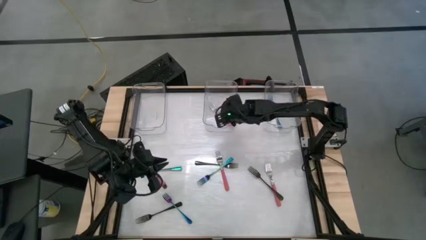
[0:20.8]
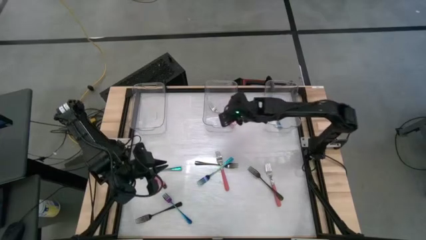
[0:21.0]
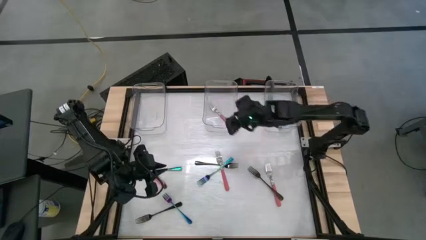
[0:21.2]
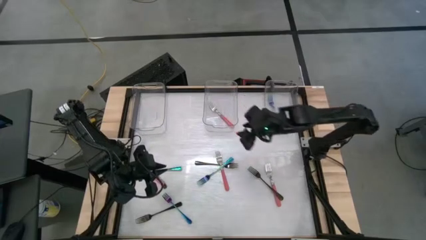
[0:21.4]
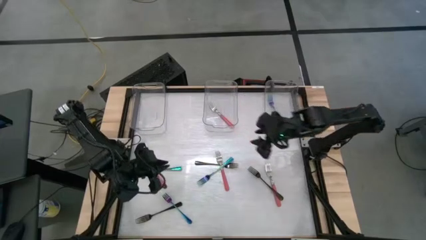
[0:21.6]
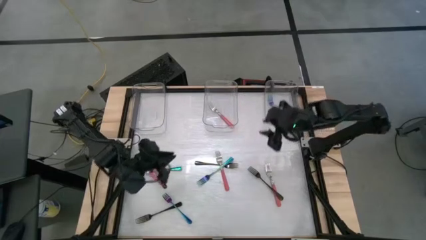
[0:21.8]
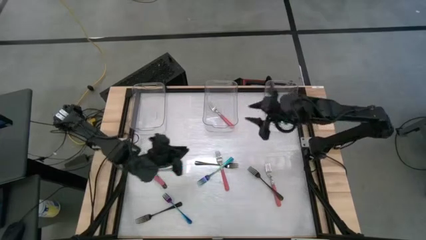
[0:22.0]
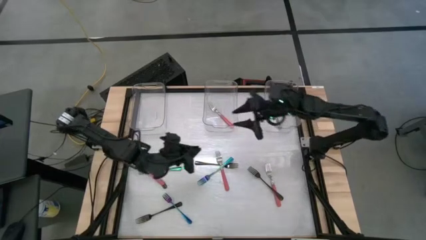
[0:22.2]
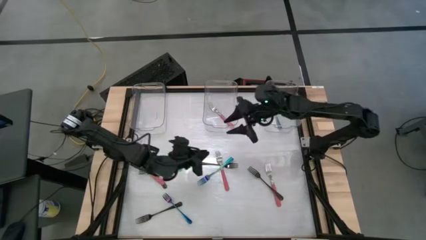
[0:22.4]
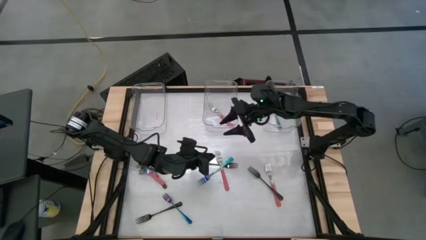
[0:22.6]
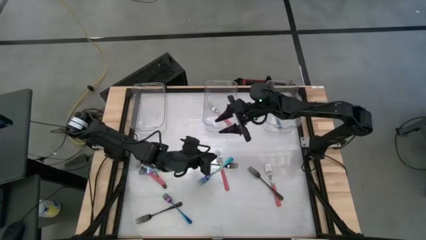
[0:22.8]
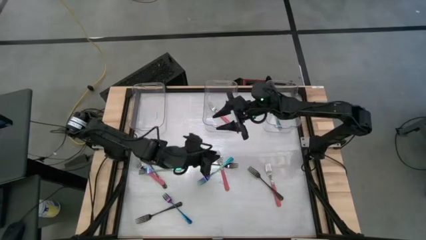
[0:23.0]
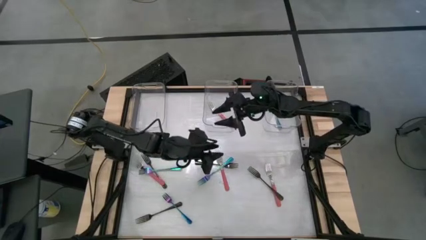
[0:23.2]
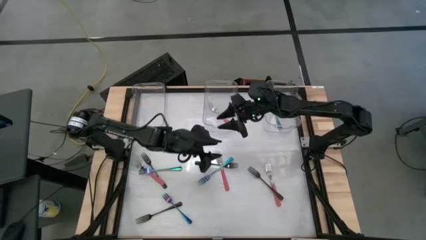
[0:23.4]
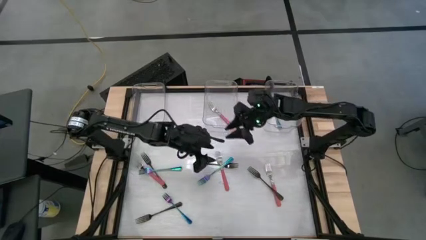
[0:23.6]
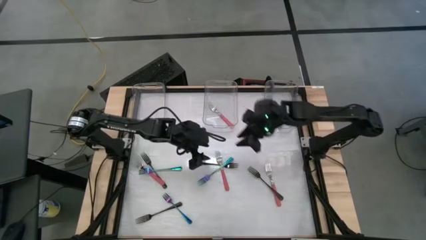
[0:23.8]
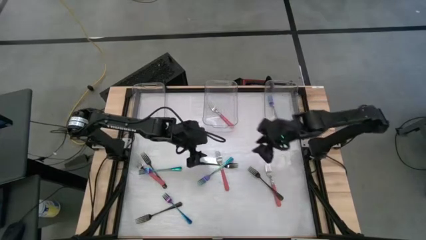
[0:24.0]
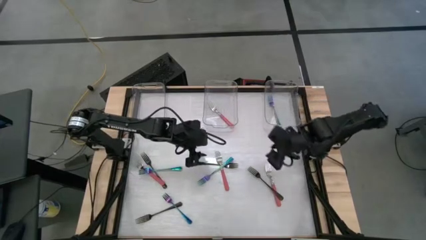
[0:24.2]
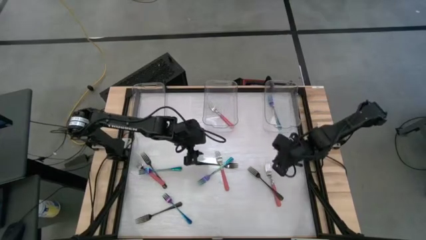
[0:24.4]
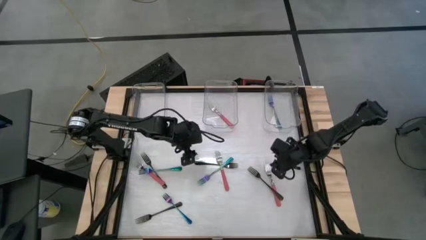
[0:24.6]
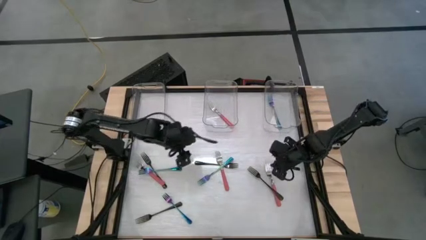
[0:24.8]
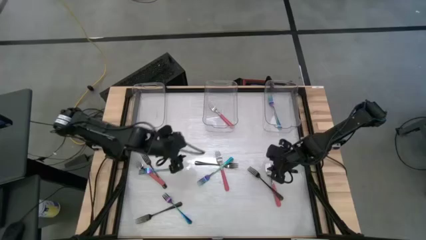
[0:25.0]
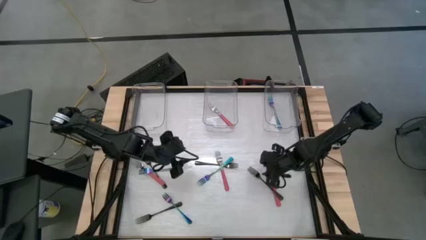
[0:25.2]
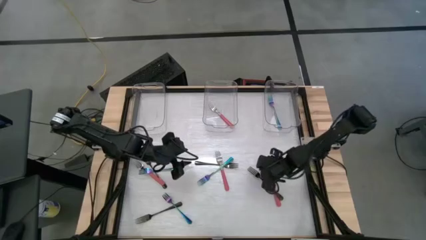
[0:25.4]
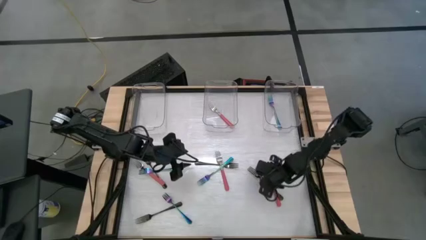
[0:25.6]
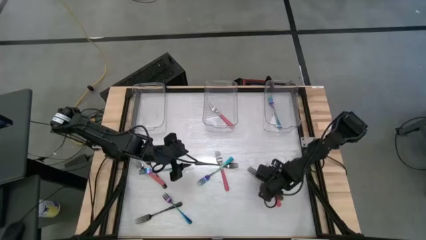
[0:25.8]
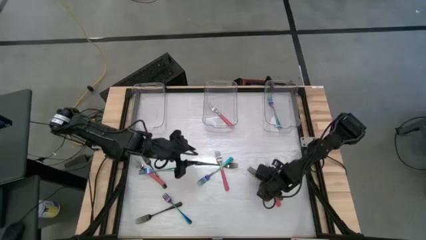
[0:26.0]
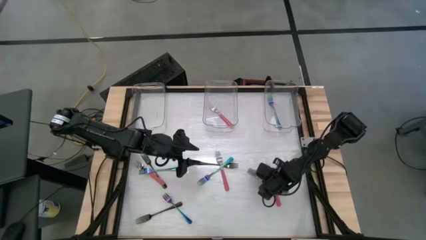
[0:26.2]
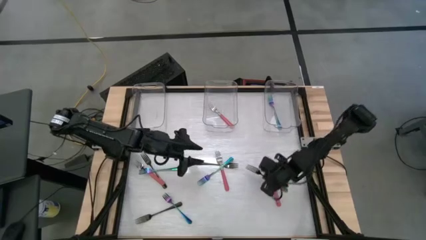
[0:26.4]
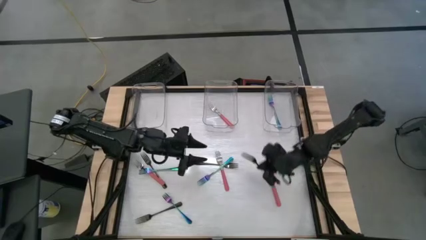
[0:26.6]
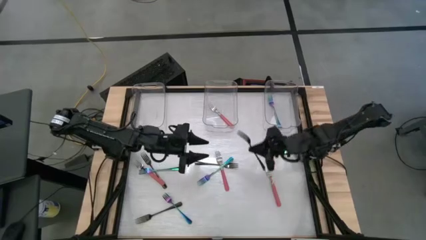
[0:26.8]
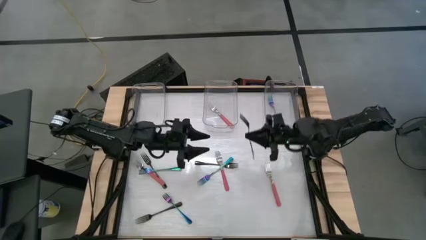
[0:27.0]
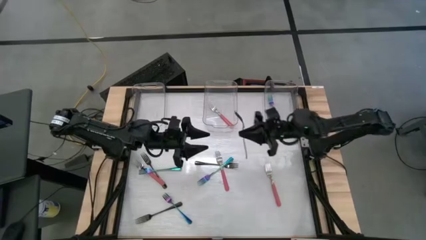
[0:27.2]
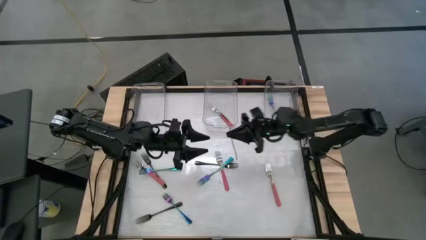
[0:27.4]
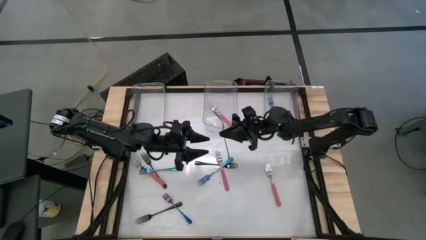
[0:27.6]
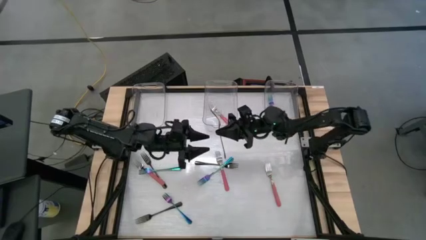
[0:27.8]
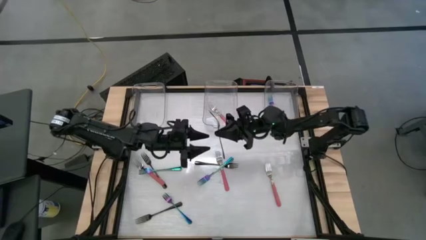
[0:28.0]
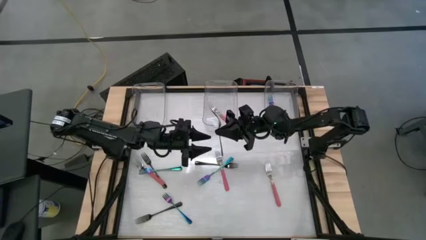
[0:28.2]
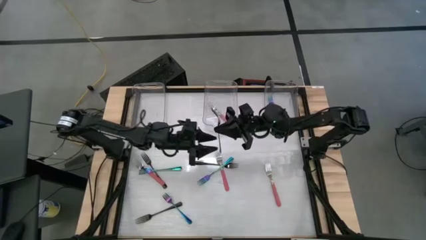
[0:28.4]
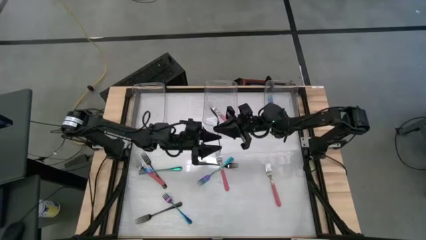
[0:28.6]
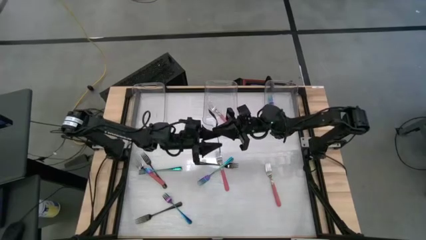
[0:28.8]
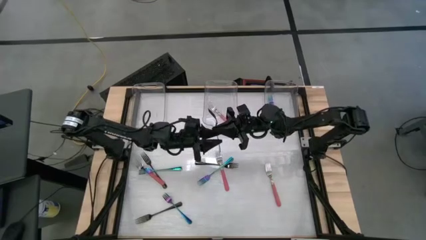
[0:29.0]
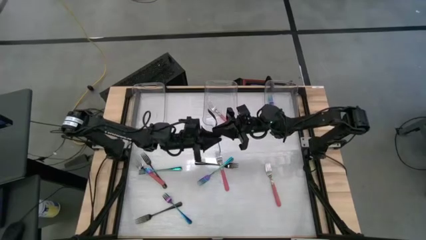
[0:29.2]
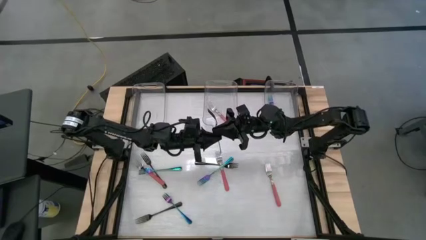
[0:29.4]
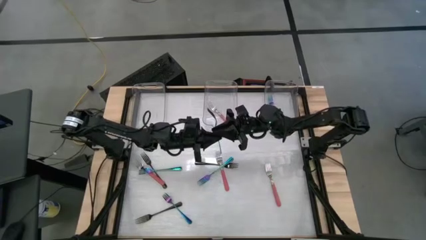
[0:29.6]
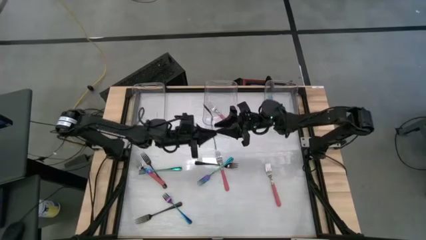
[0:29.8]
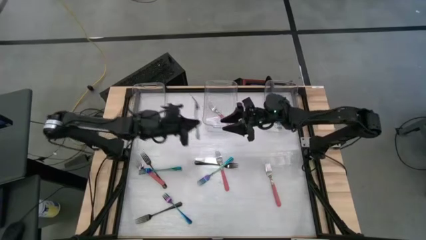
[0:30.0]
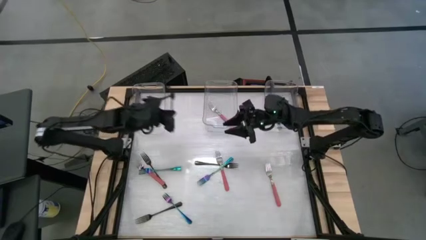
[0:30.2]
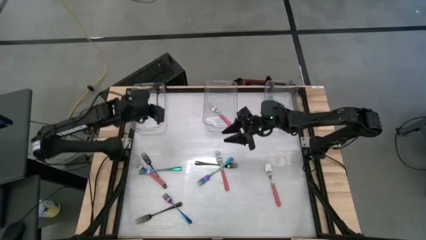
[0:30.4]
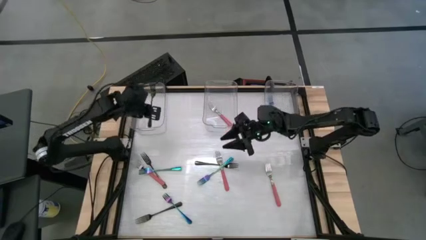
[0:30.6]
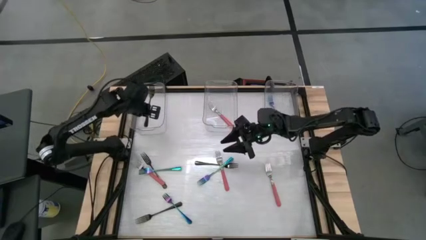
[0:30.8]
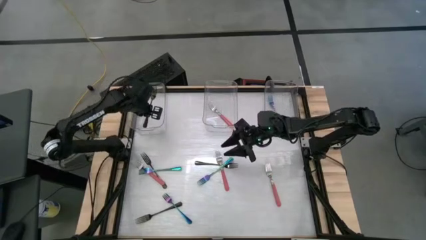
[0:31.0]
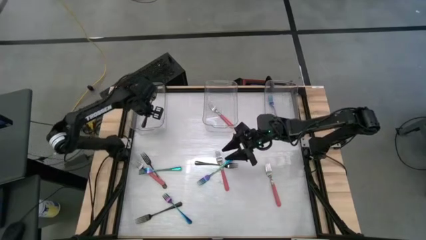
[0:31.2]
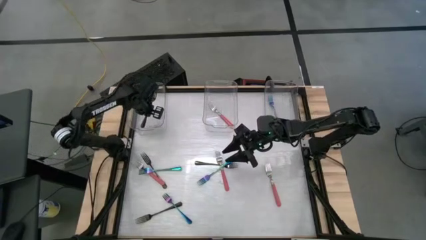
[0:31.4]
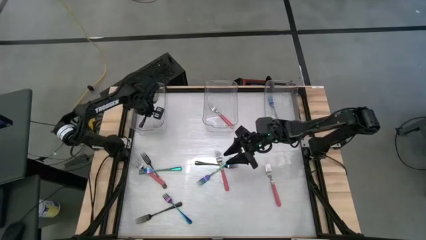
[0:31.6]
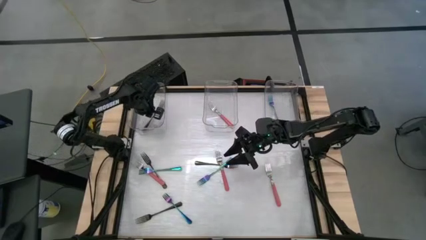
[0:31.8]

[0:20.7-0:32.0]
Task: Sort silverware by color (type)
Put the top right black fork into the left transparent bin
